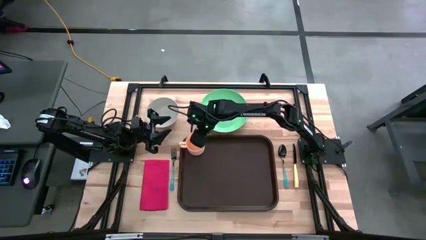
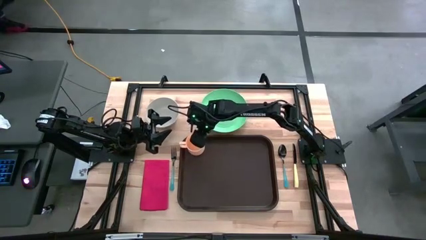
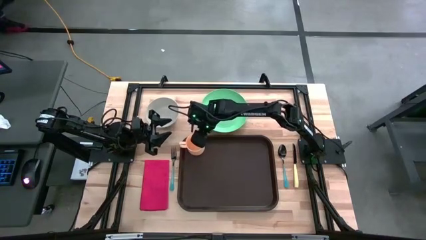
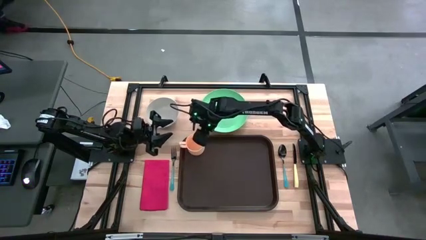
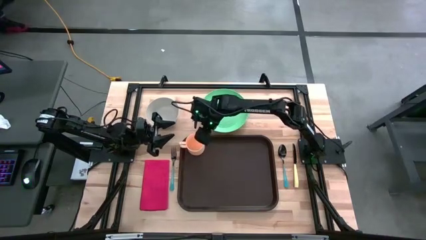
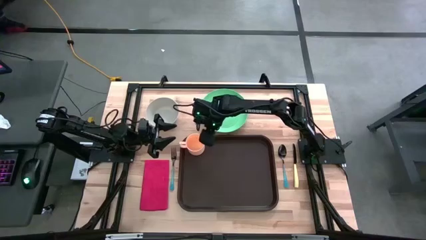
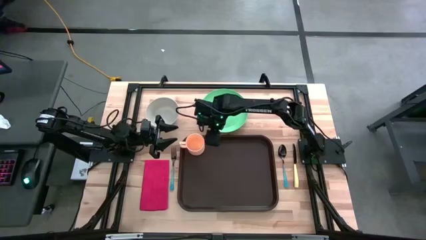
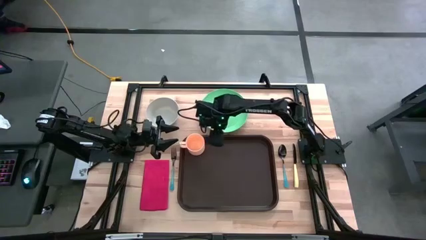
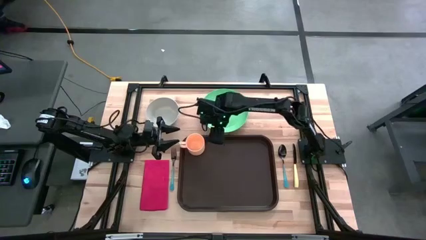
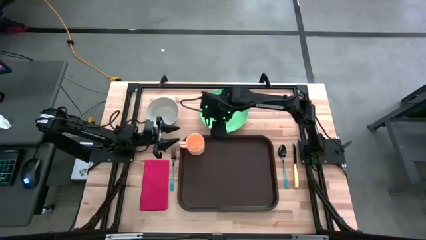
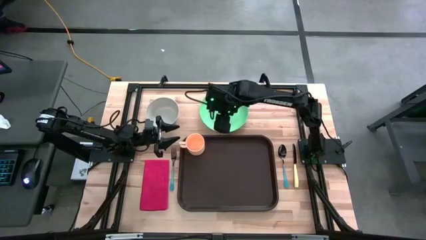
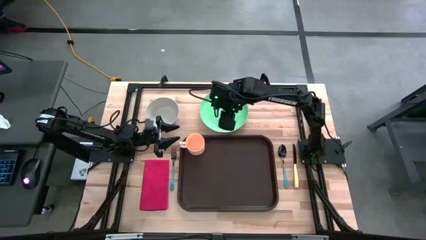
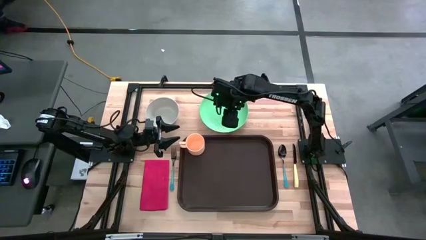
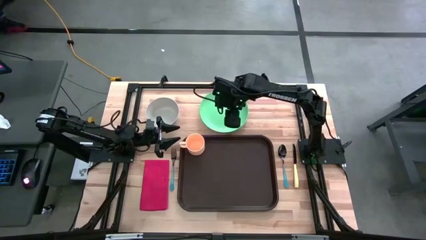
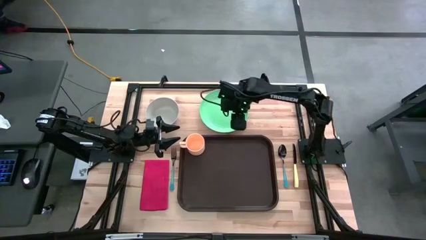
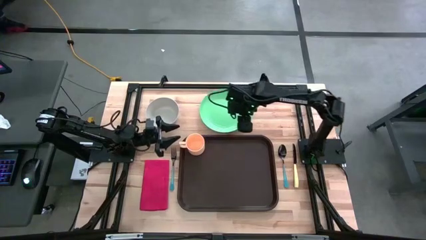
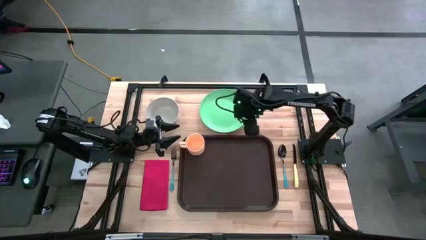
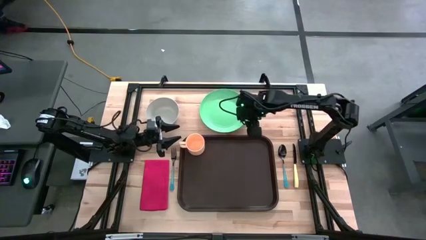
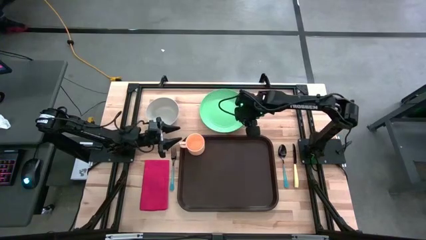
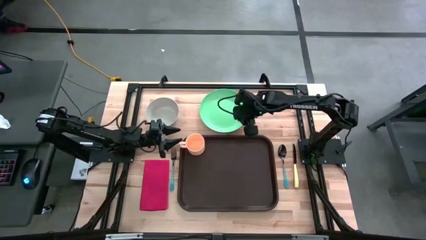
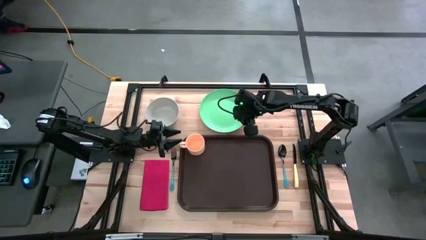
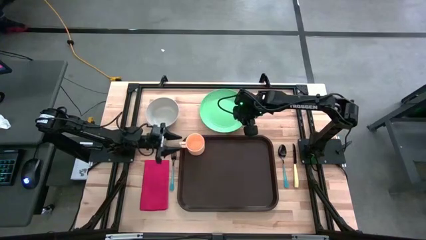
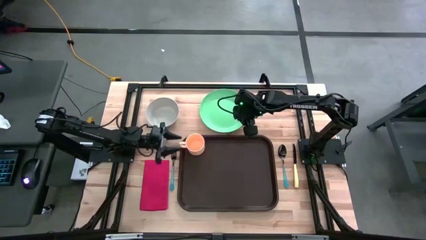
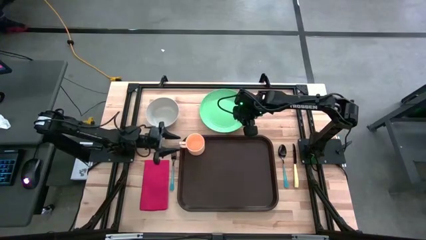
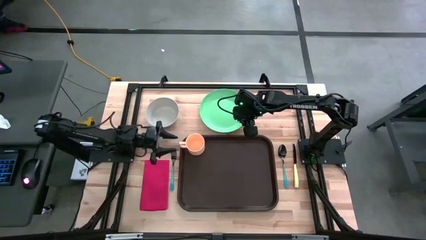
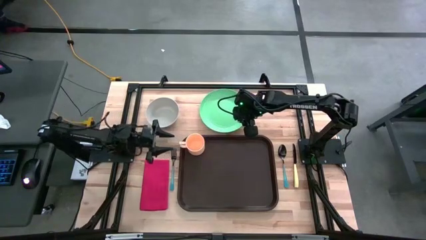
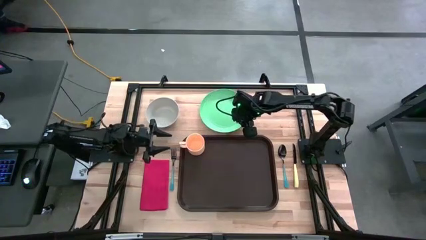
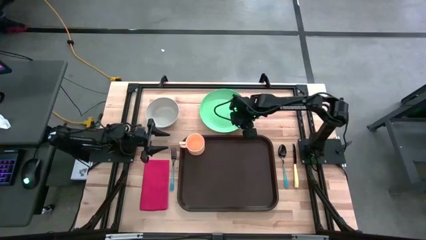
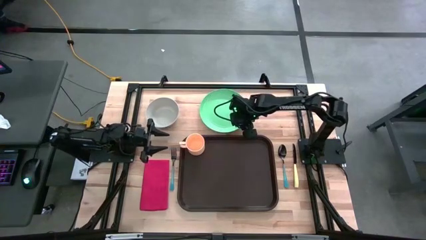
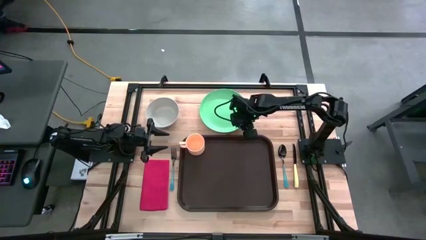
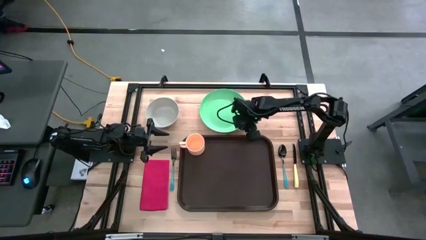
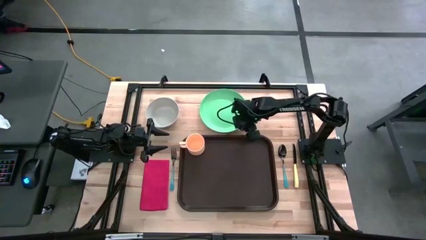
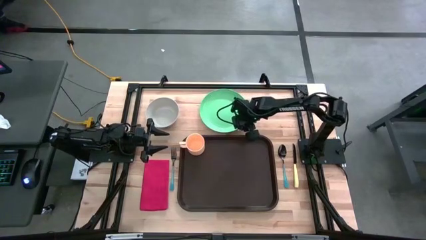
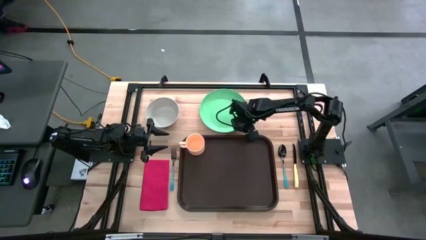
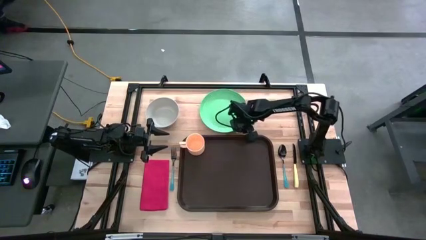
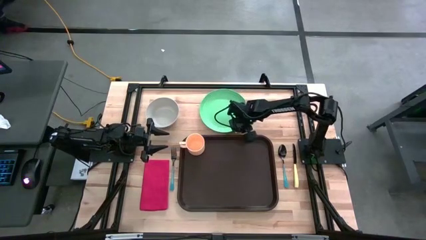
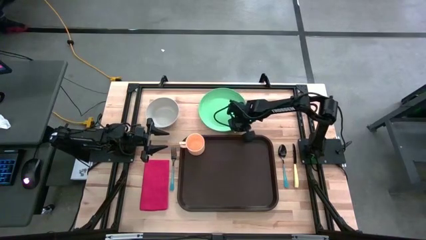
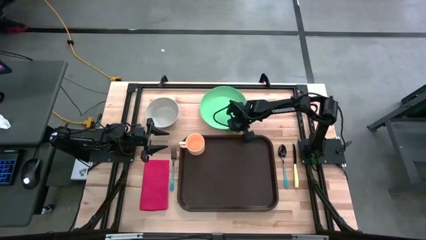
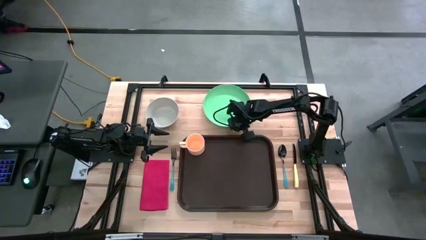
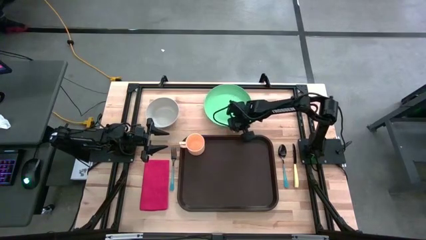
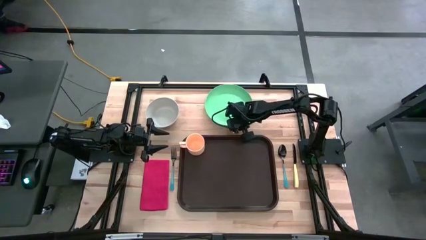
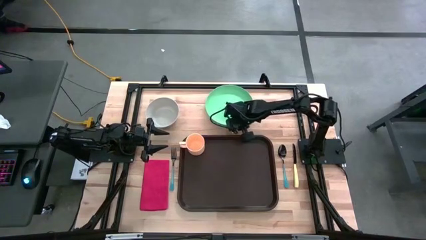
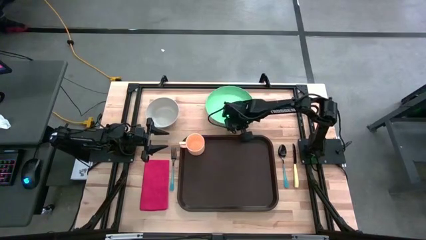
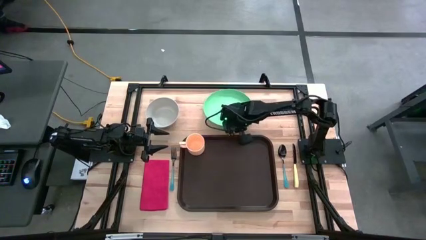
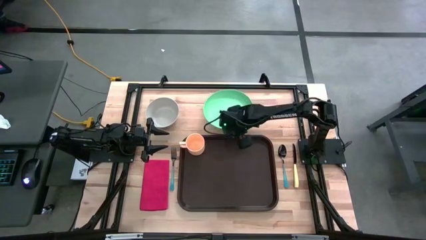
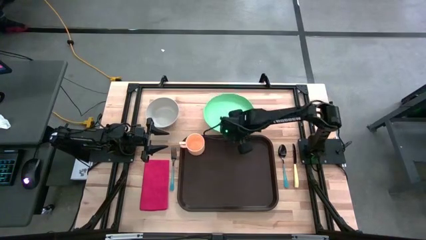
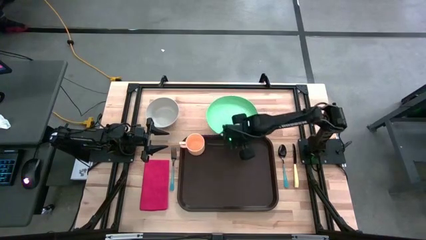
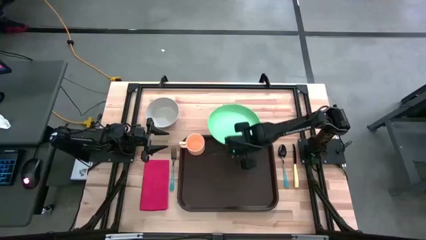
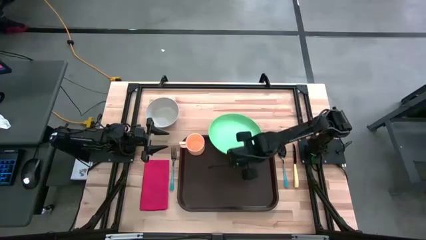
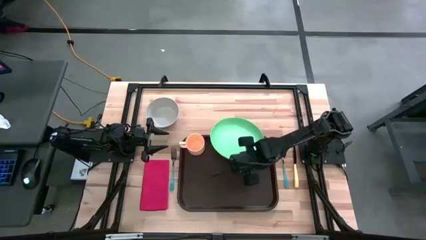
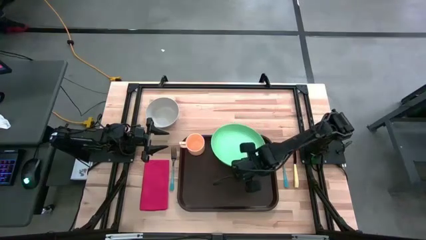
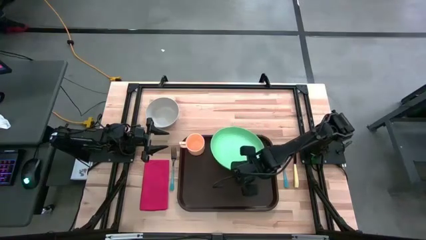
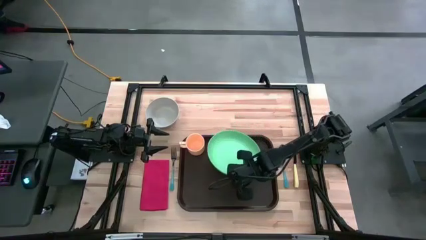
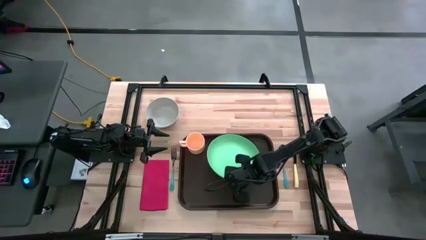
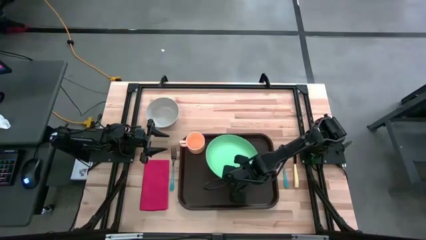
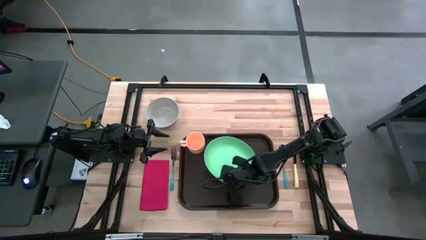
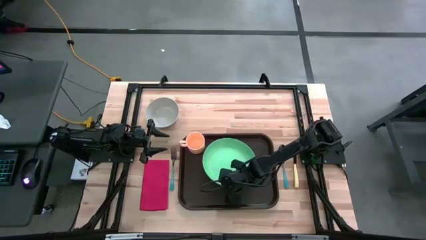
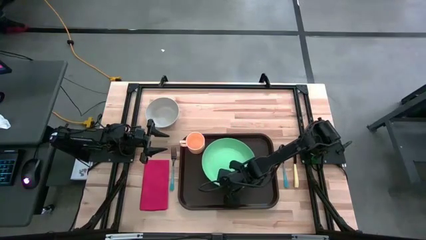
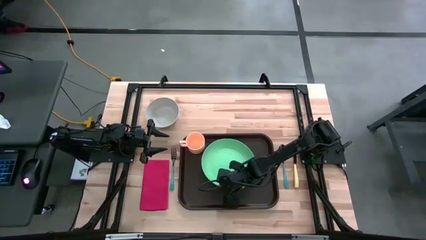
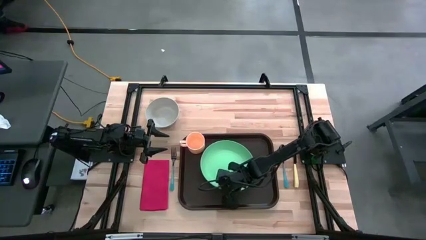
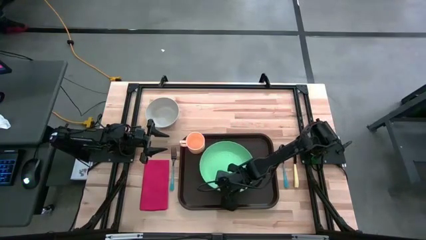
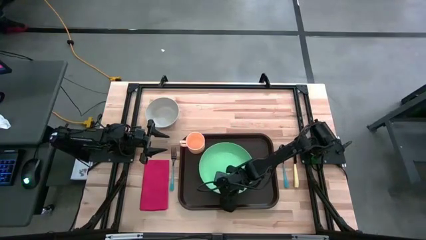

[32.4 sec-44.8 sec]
Task: Set up tray
Put the green plate on the brown serving tray

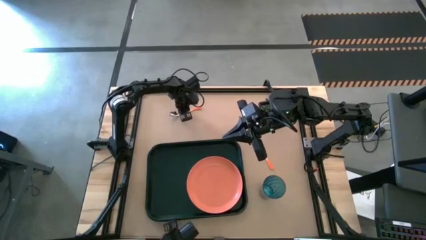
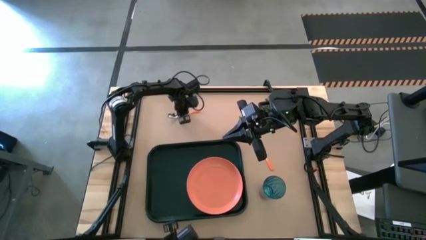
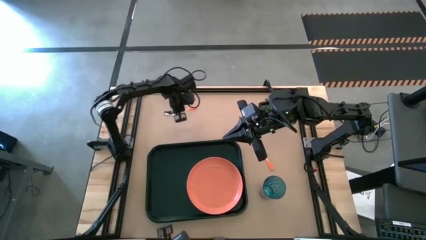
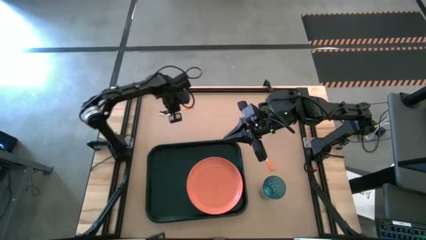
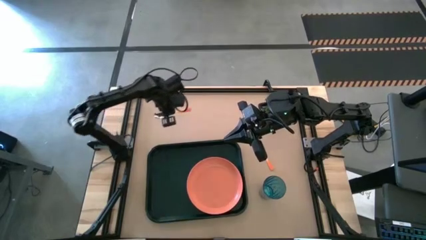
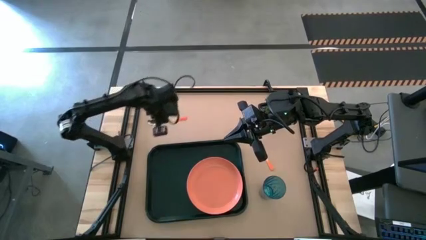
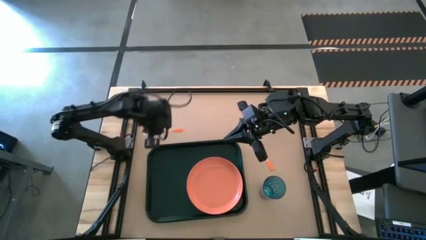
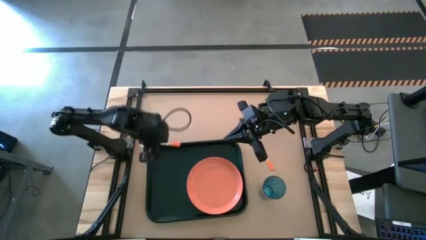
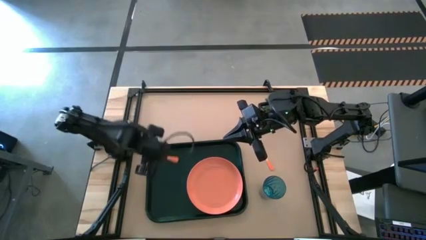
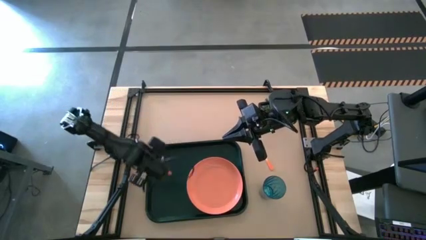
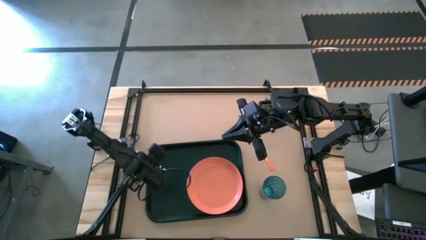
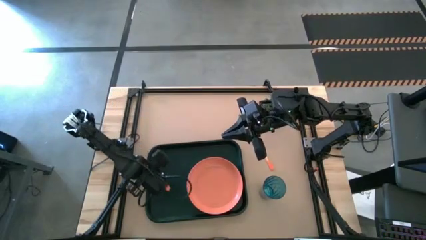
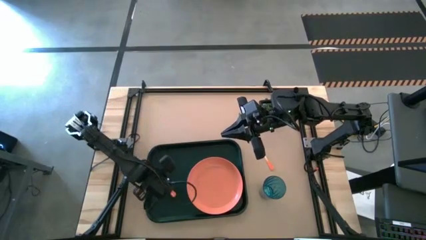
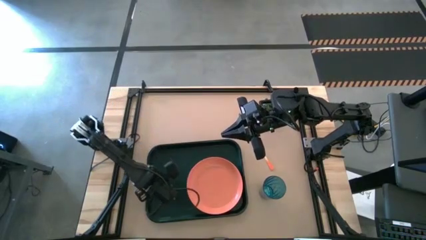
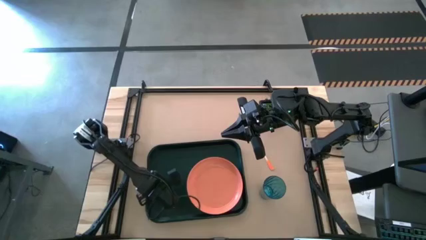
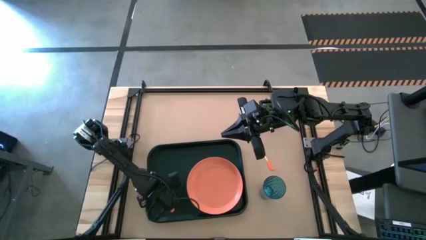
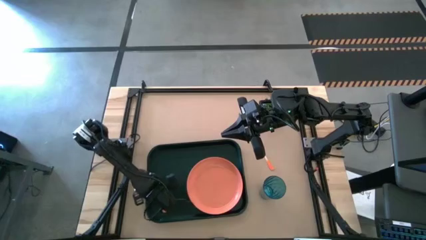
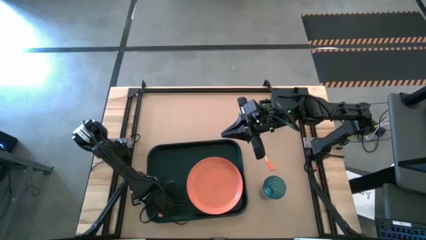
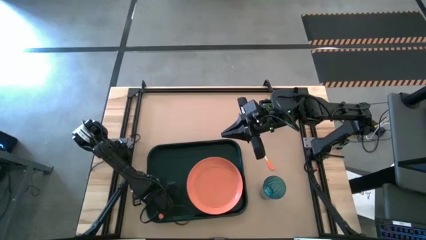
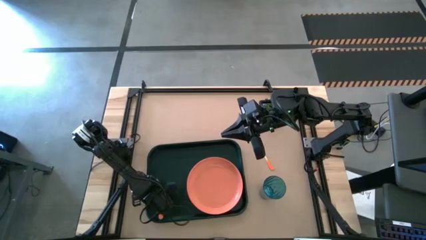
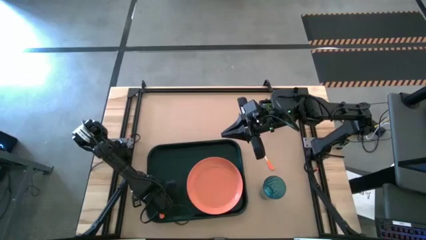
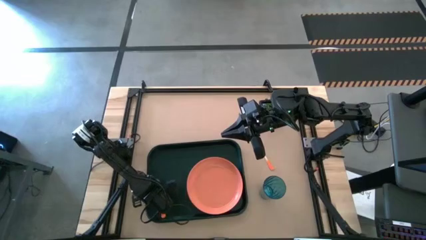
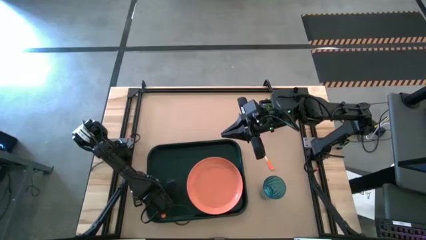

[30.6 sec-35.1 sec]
Task: Pick and place plate/cup/fork/spoon on tray
Put the orange spoon on the dark green tray
